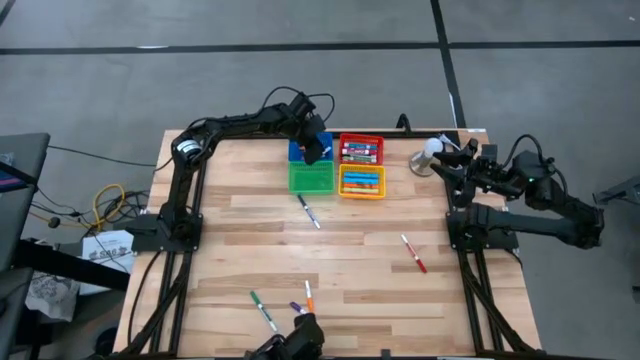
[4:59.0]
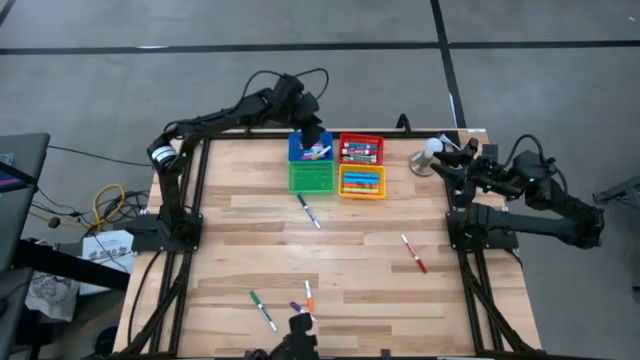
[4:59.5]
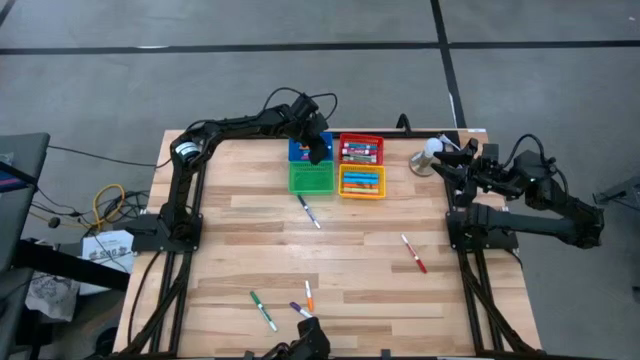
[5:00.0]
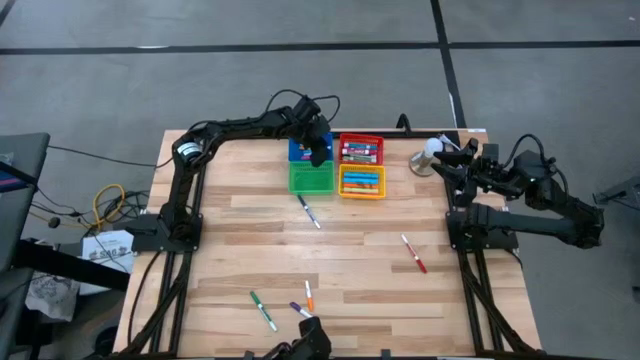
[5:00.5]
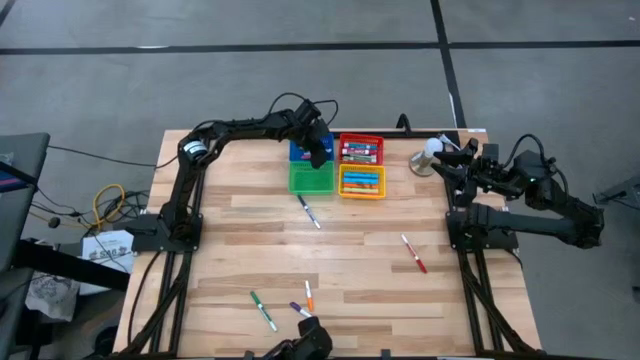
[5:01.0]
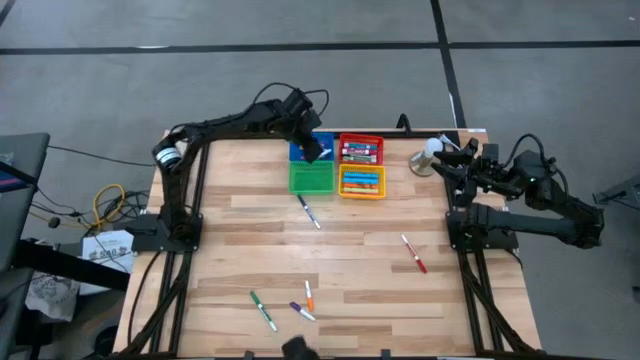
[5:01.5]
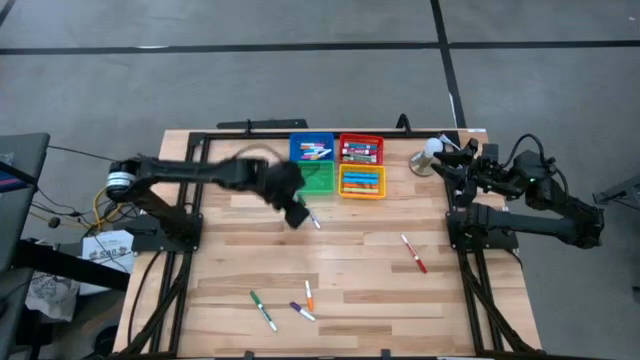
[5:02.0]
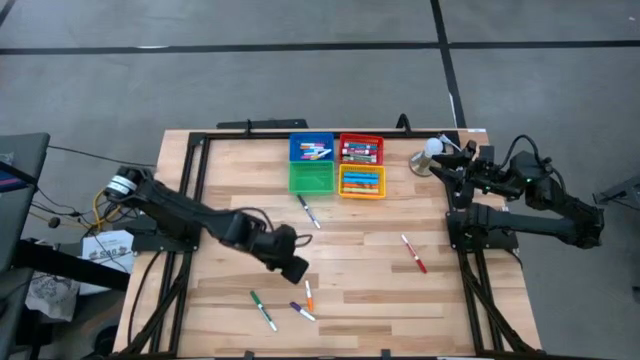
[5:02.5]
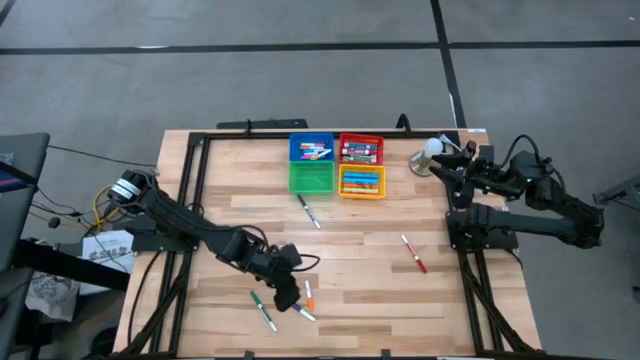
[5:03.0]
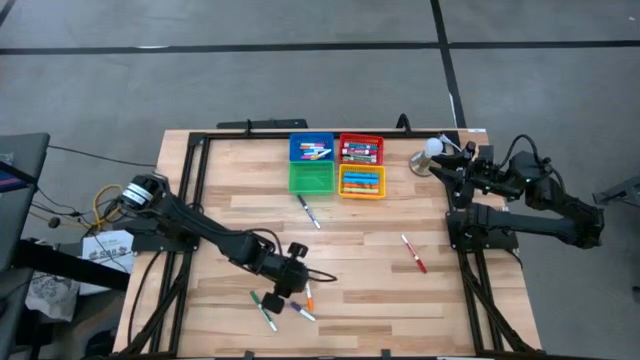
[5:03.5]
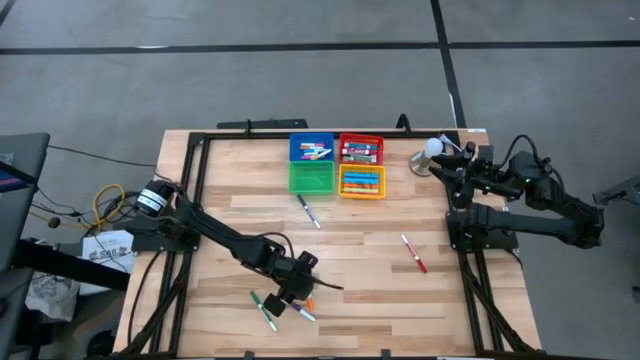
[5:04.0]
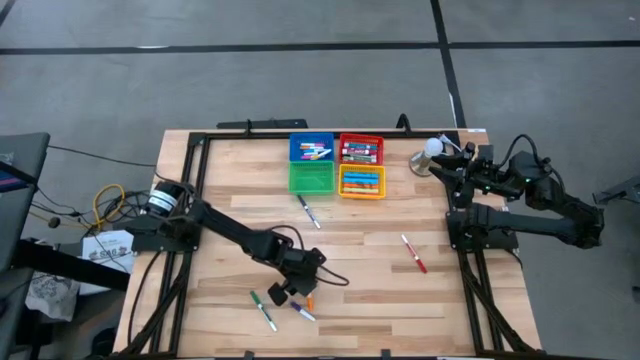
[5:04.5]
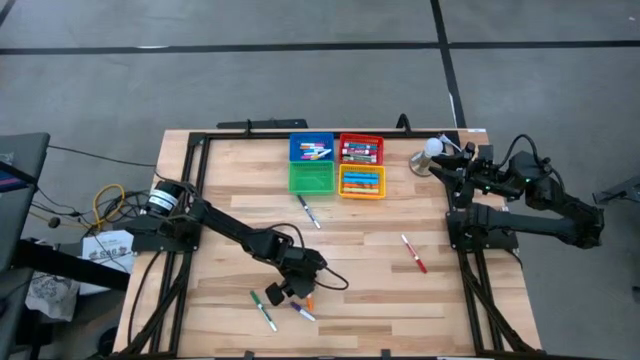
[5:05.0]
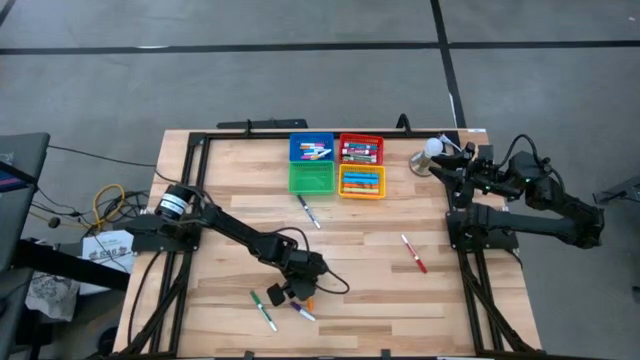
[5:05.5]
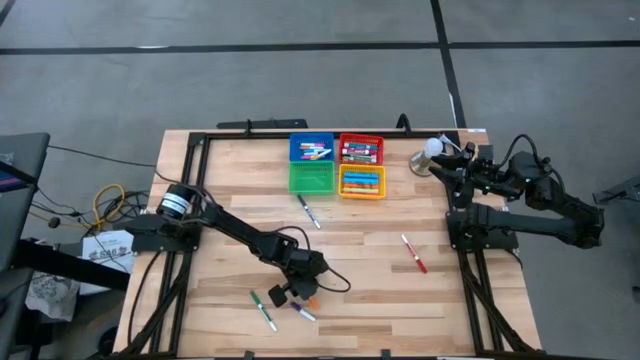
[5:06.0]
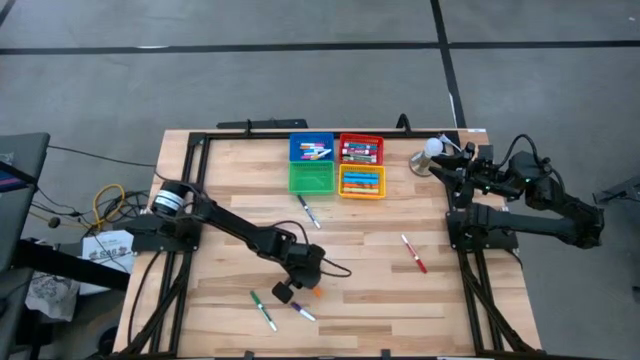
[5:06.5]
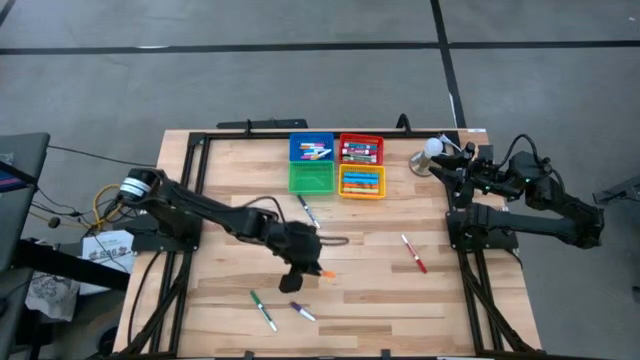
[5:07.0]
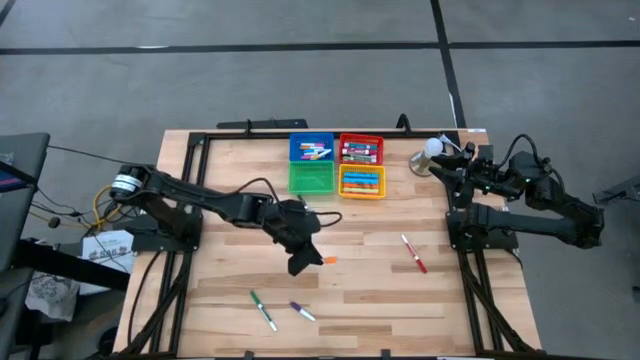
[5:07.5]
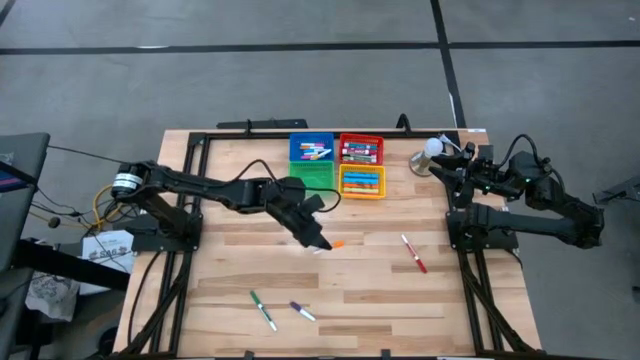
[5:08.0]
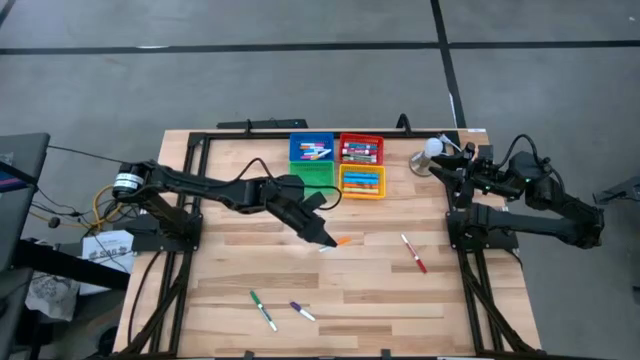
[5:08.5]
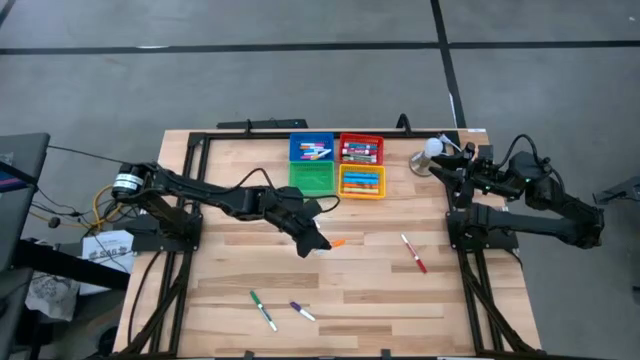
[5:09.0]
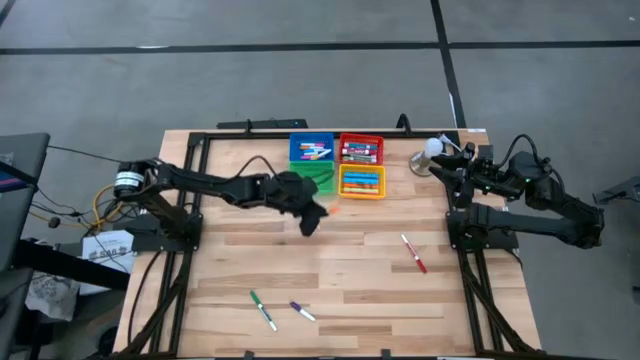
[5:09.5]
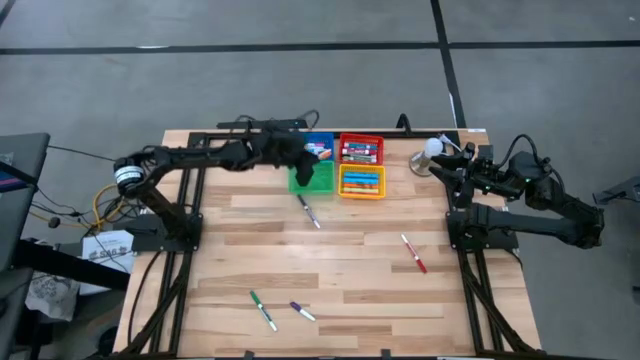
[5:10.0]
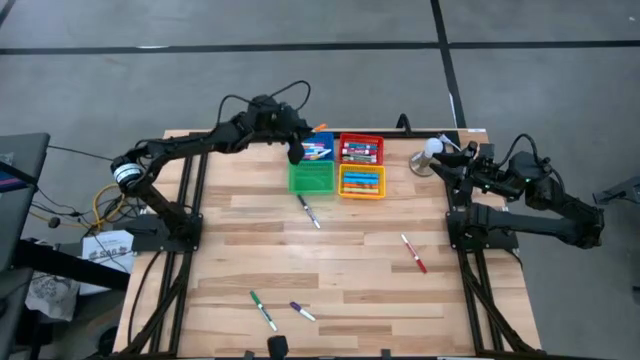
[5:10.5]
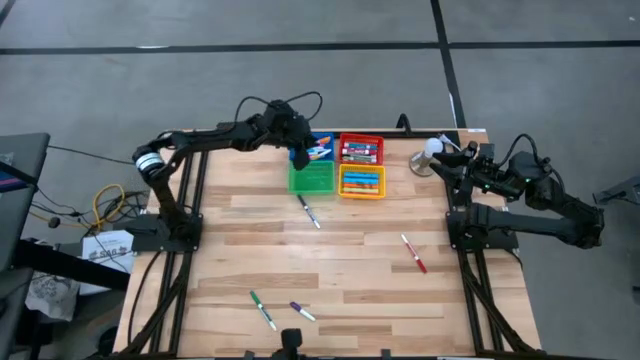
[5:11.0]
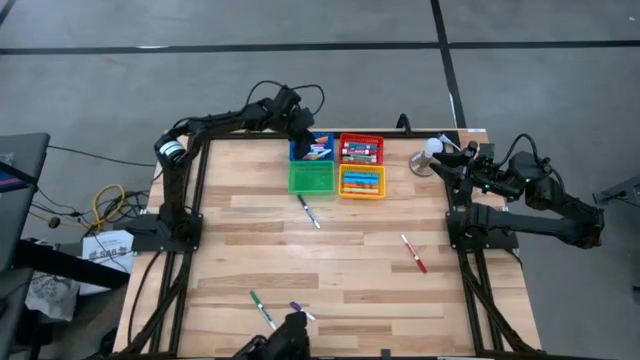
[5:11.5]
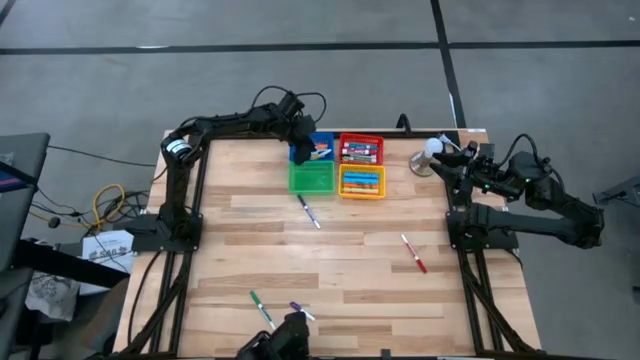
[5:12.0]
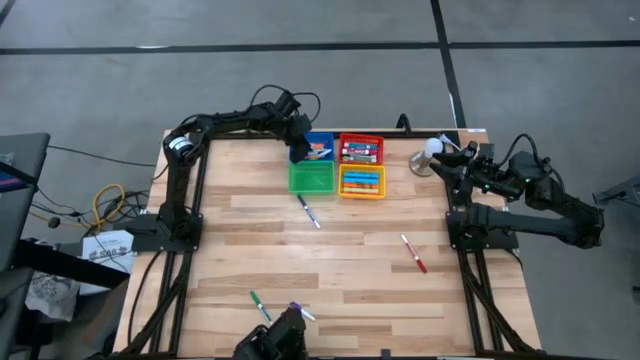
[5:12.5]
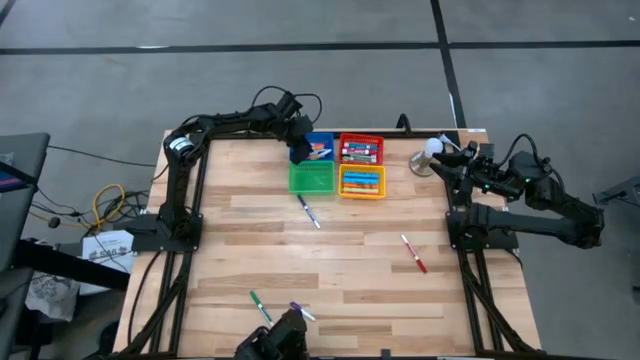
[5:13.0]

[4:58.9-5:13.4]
Task: Pick & Place Markers
Put the orange pen into the blue bin
